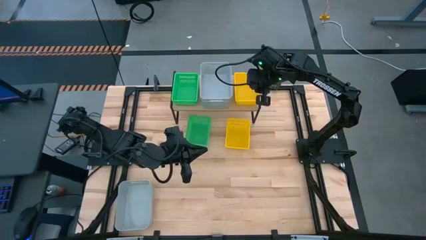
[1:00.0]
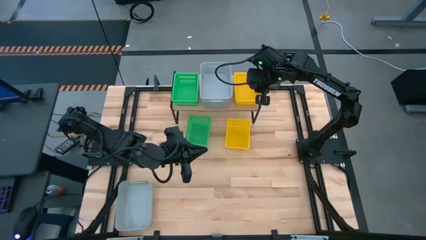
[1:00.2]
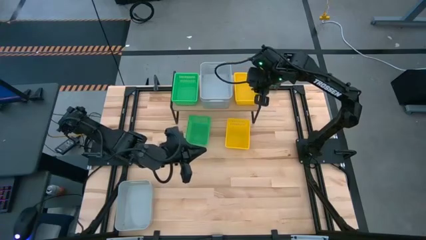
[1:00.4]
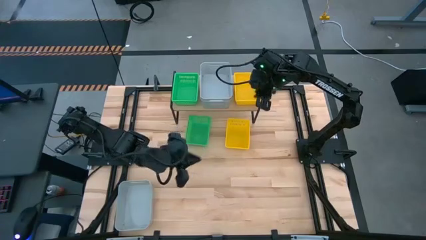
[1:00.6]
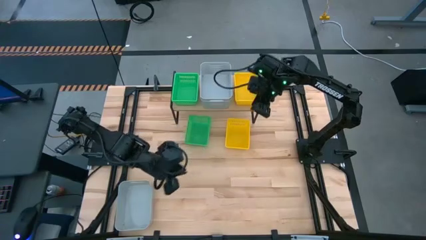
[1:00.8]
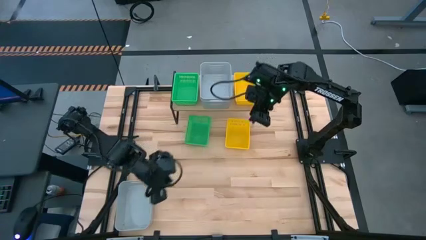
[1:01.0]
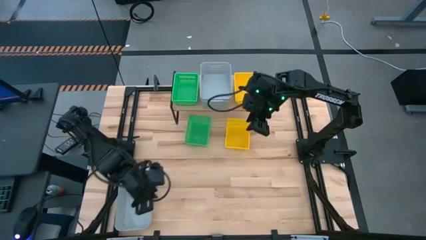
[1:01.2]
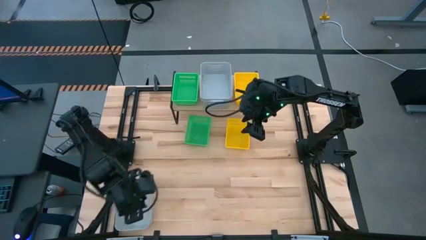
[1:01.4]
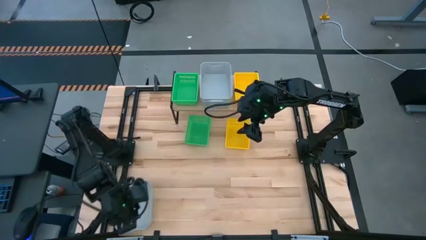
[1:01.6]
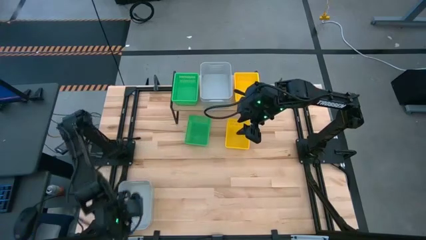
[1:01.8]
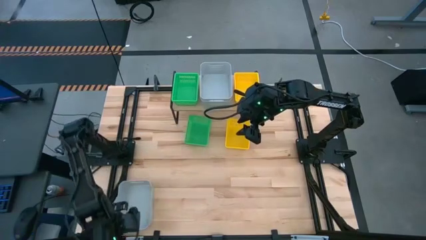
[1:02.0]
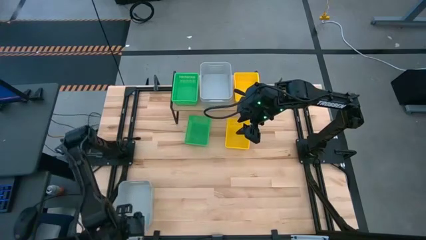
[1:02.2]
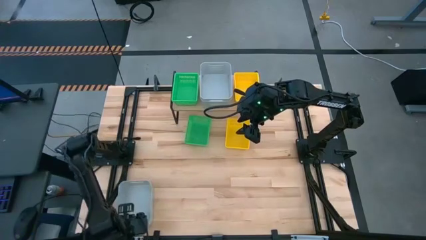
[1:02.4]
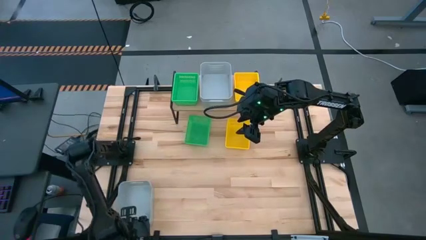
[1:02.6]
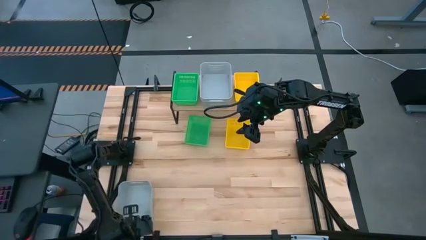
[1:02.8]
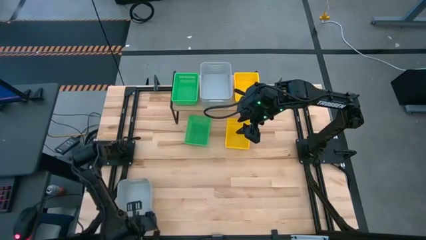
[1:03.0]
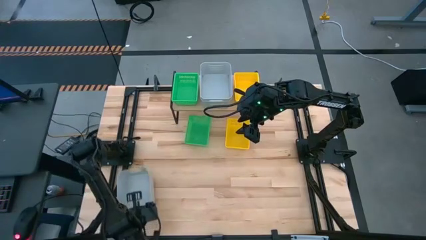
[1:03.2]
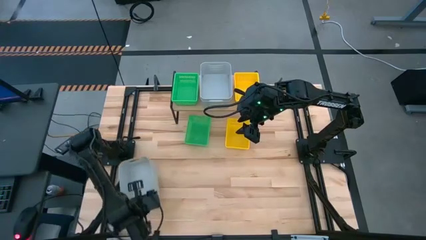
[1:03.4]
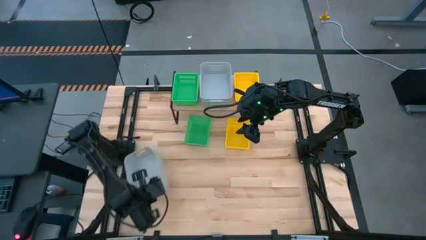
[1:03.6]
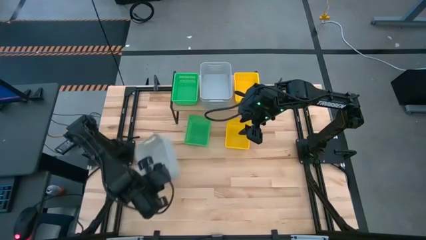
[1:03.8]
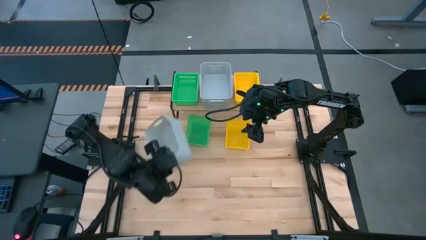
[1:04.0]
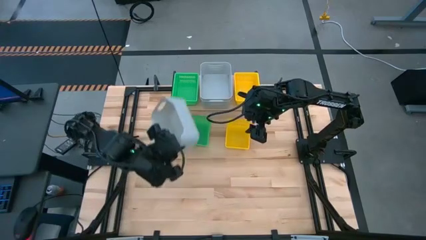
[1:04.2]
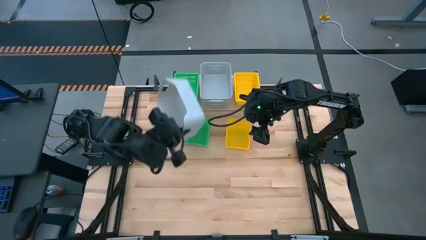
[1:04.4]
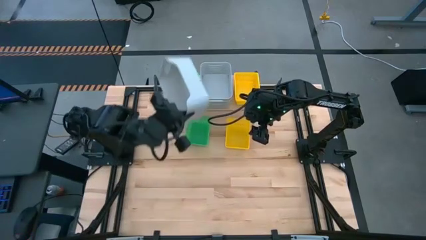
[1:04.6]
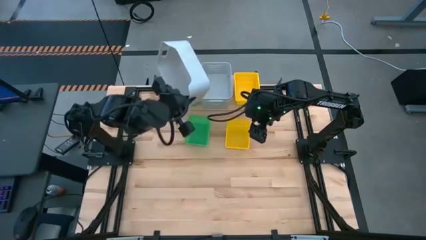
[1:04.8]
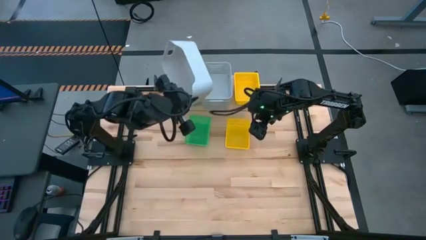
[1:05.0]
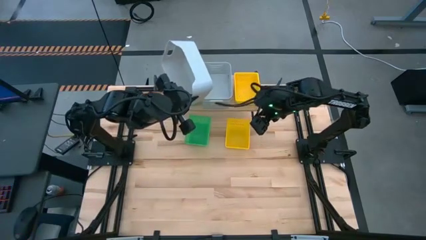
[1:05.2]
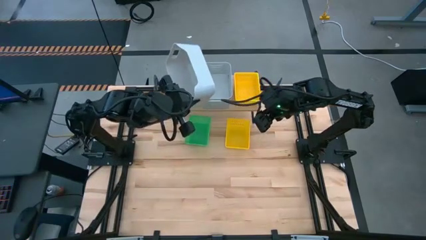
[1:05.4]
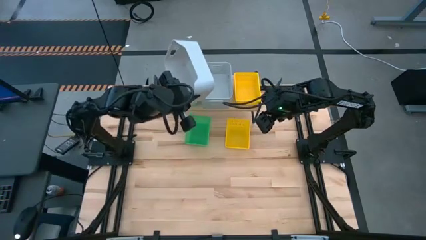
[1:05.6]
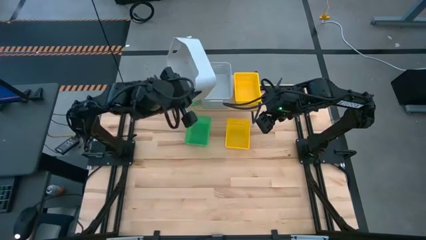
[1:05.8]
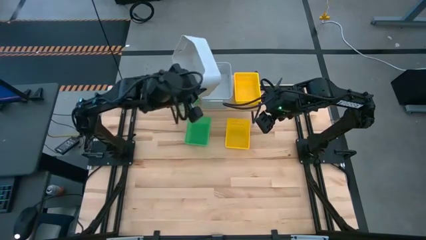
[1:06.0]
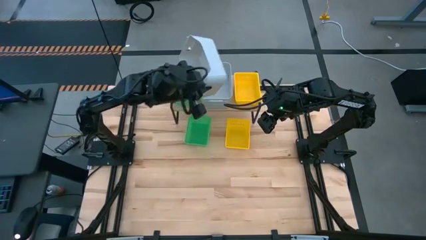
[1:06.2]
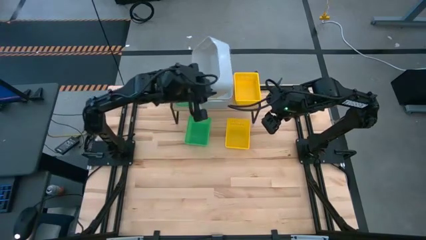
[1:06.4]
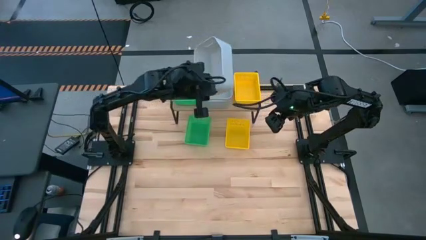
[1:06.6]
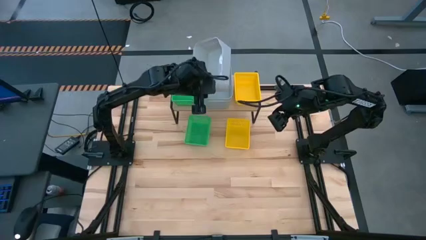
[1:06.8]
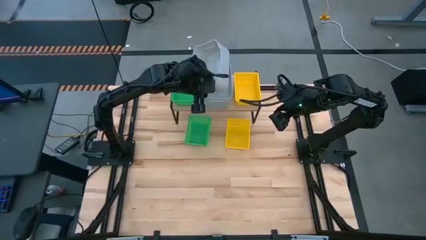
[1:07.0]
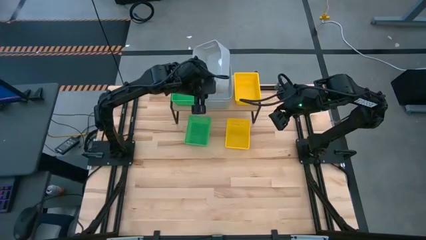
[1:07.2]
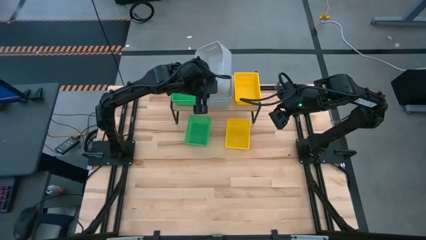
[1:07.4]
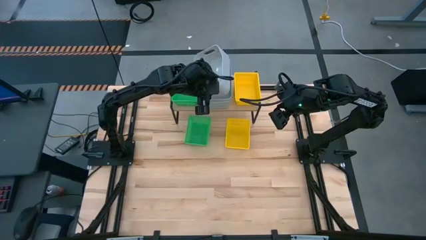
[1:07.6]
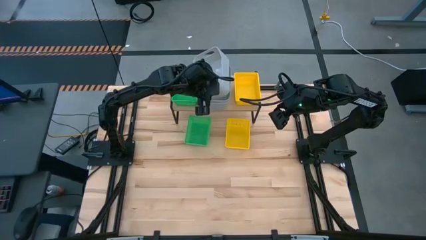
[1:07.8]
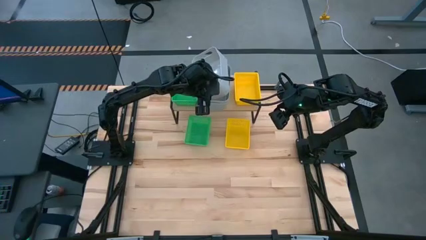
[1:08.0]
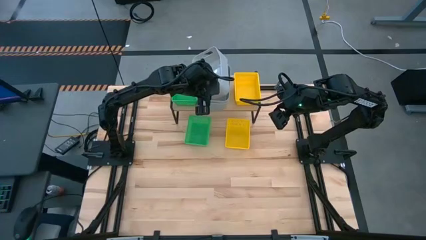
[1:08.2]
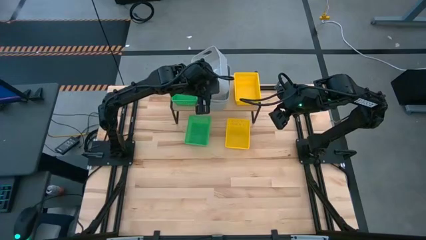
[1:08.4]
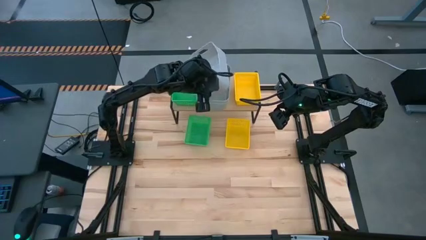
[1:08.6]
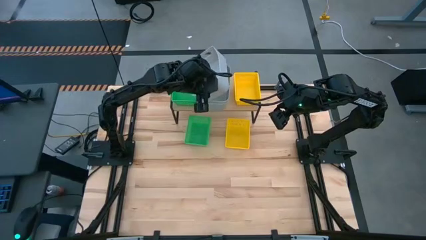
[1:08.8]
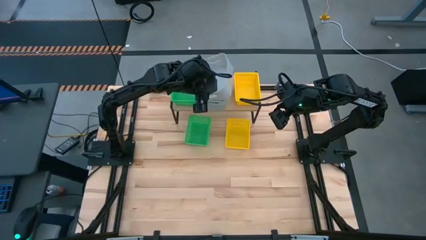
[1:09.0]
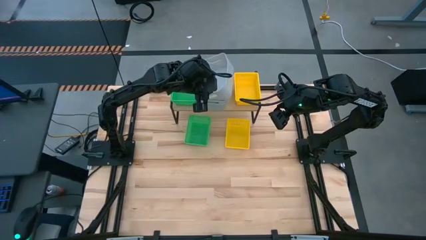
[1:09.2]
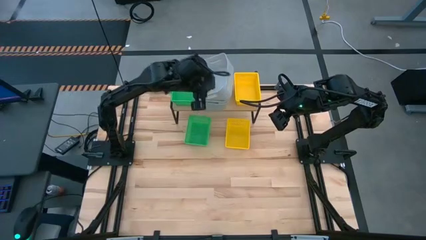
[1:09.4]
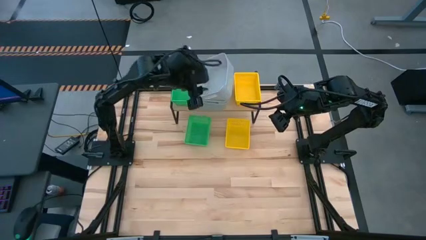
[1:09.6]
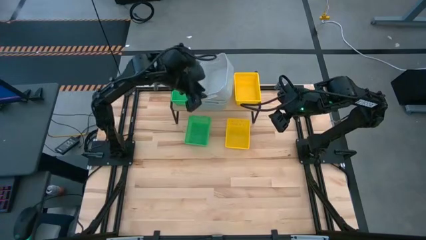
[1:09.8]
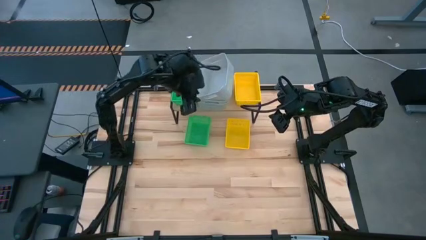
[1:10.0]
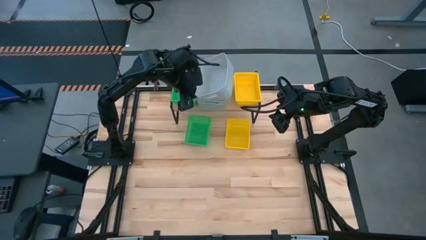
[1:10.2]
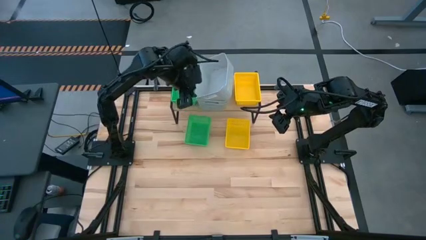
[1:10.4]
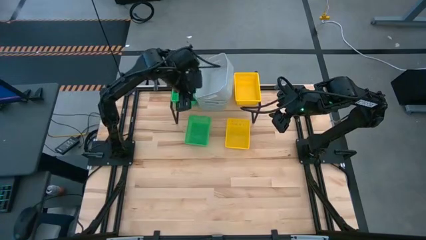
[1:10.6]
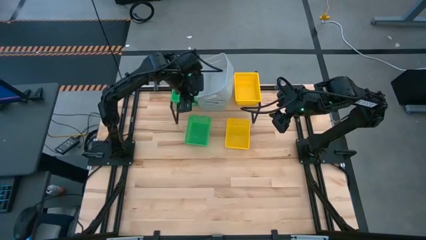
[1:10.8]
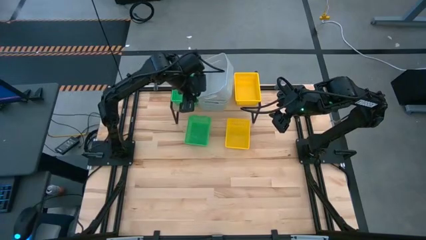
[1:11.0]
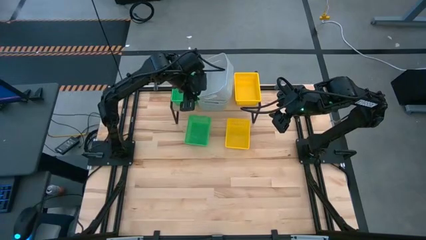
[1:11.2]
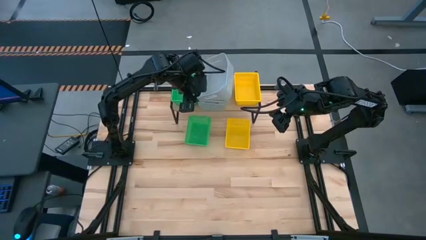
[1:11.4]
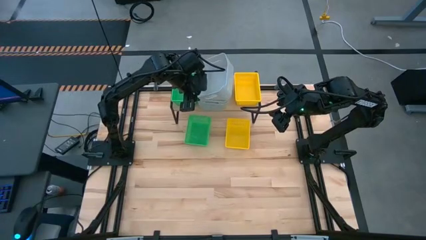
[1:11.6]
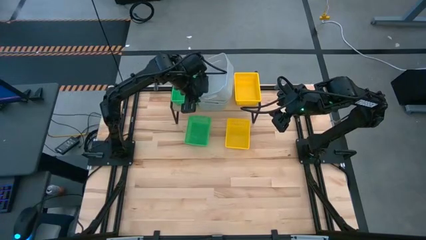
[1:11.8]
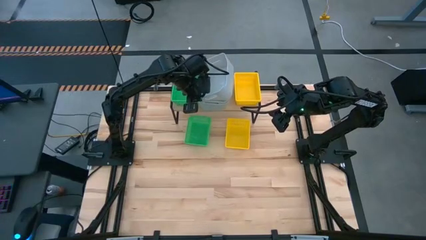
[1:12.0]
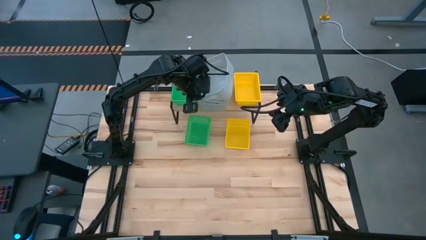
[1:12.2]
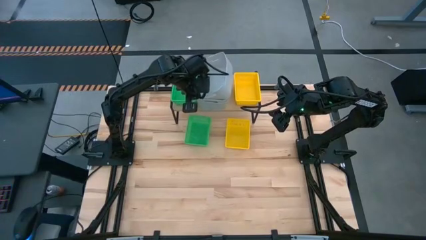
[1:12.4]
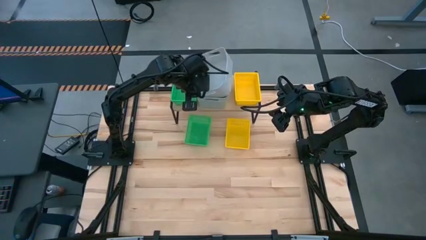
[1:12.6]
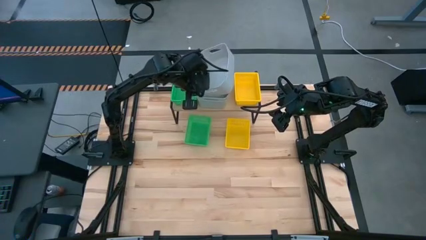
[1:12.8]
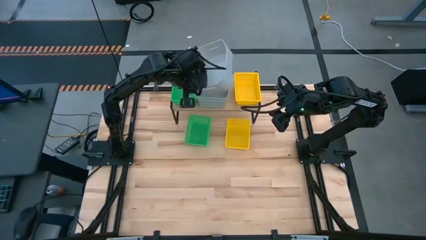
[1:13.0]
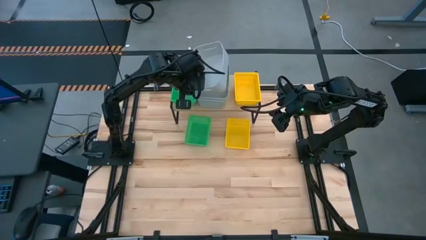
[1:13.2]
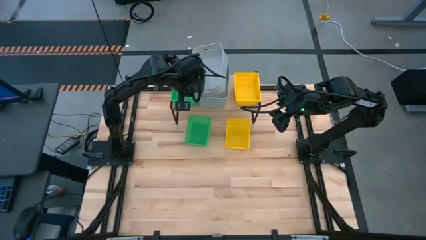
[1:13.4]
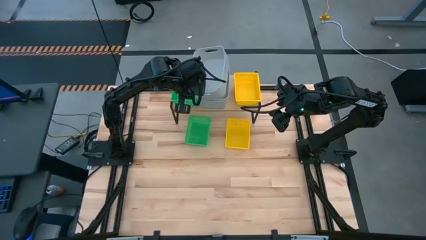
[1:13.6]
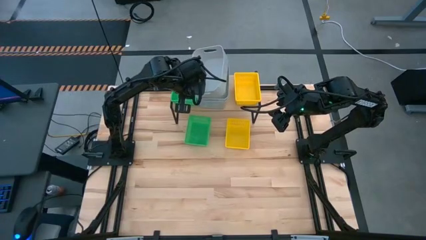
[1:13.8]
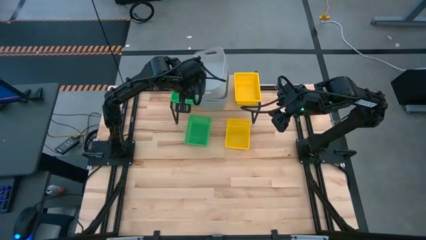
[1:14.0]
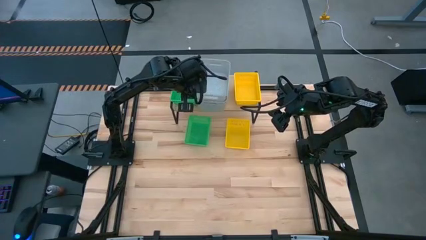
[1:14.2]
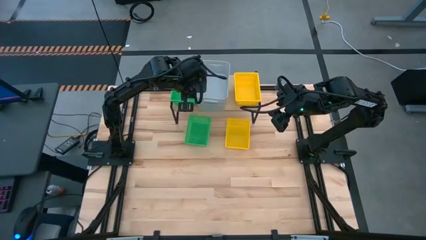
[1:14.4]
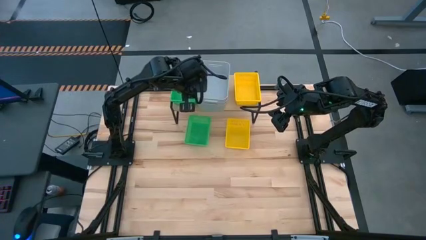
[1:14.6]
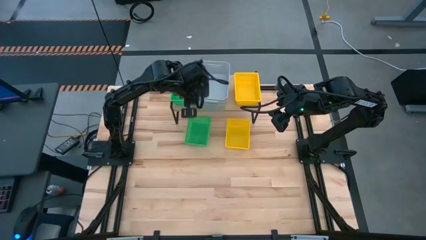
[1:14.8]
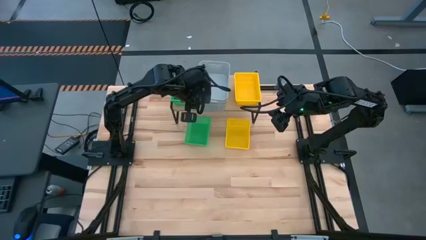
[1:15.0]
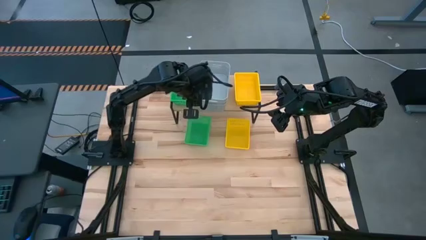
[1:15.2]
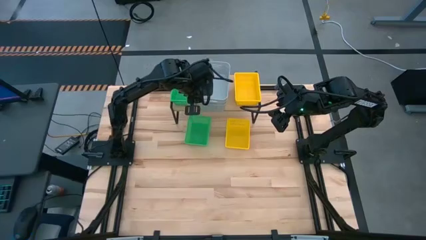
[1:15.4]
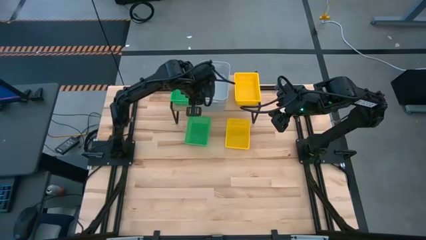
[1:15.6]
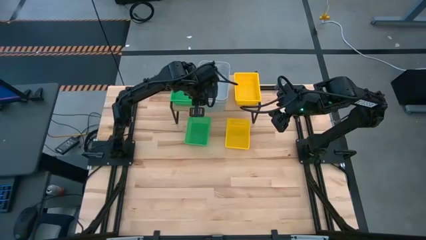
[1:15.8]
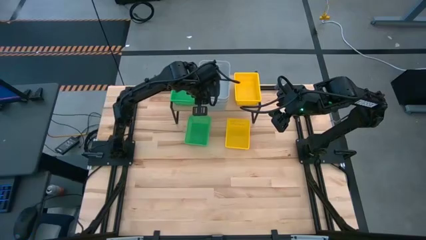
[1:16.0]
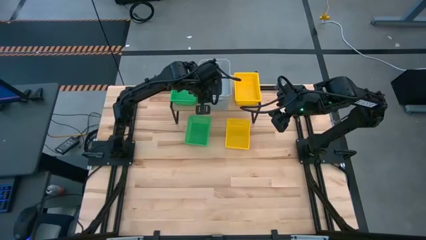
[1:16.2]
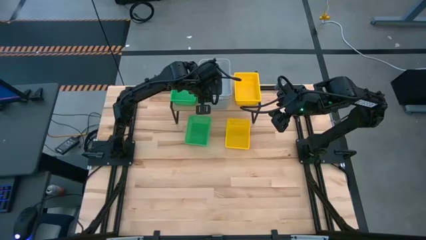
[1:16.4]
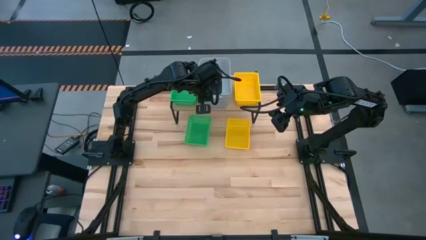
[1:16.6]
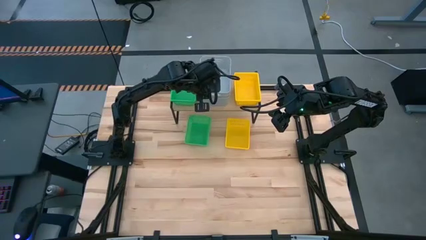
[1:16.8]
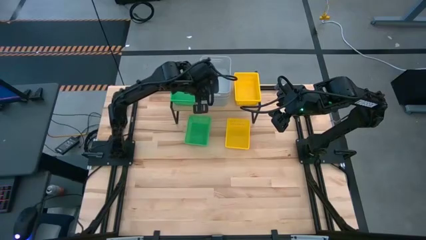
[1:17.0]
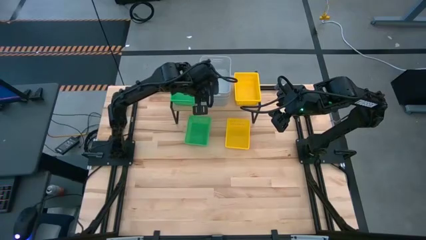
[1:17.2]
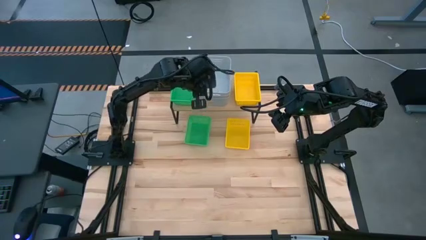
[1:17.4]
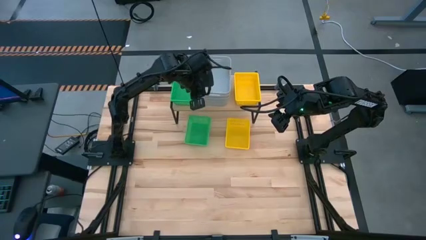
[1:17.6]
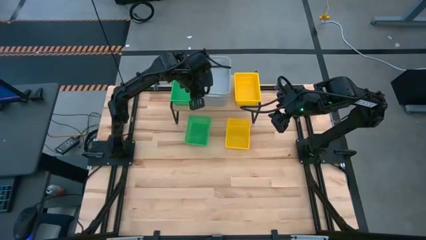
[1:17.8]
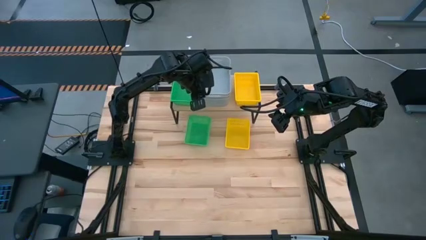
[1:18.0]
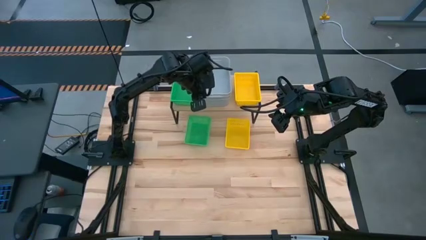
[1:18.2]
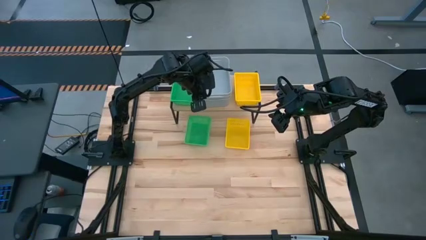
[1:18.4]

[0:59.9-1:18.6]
Task: Stack baskets on shelf by color
Stack the gray bin on top of the gray bins on the shelf
